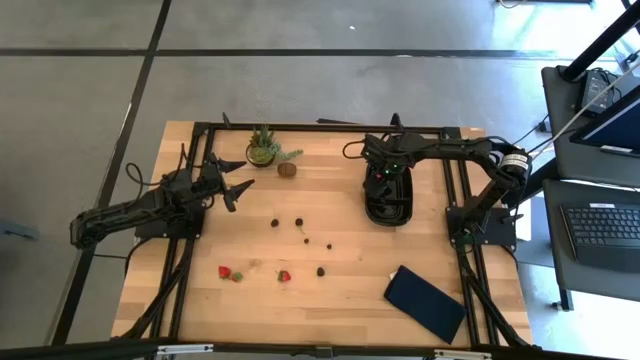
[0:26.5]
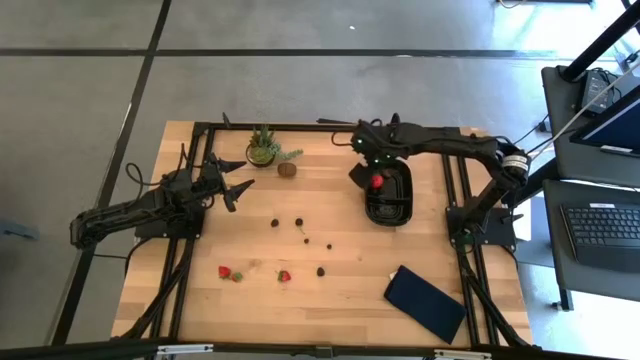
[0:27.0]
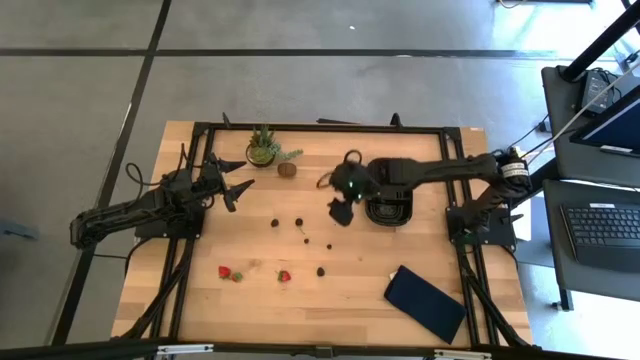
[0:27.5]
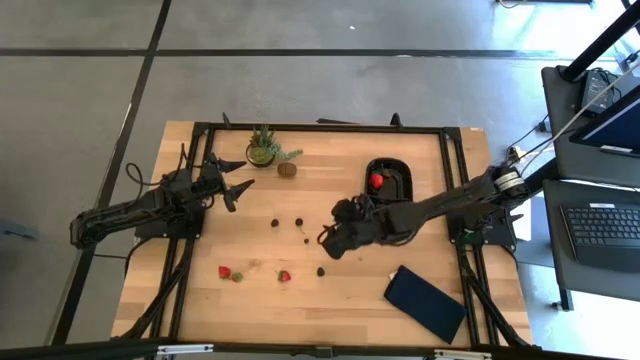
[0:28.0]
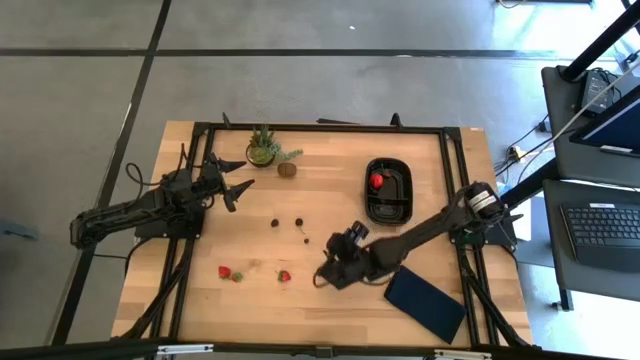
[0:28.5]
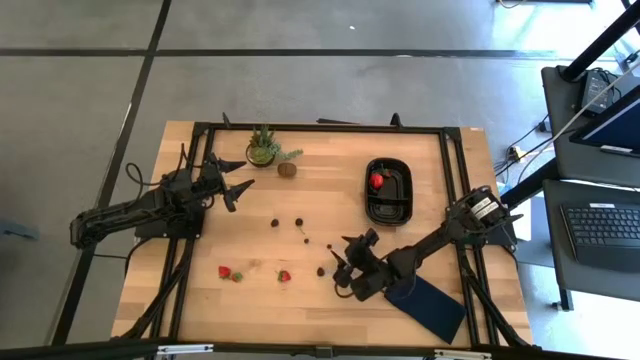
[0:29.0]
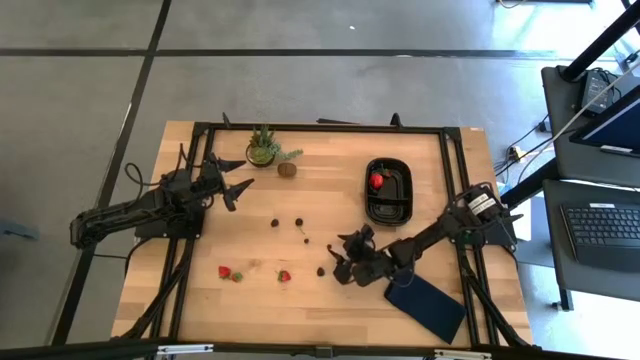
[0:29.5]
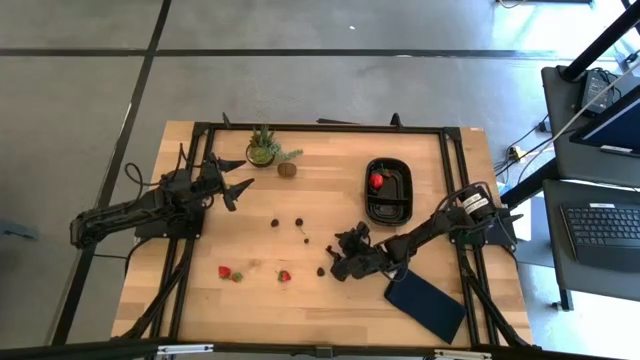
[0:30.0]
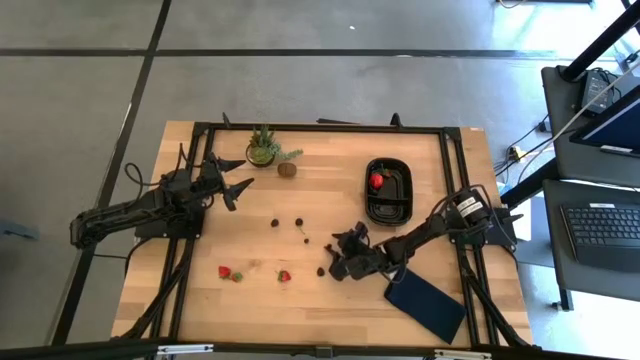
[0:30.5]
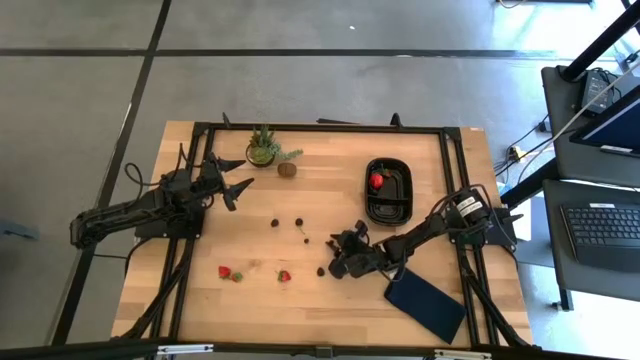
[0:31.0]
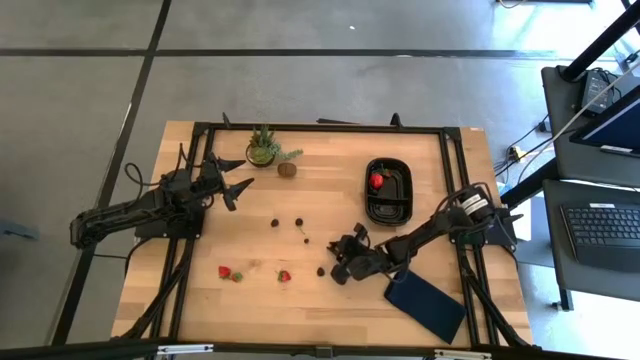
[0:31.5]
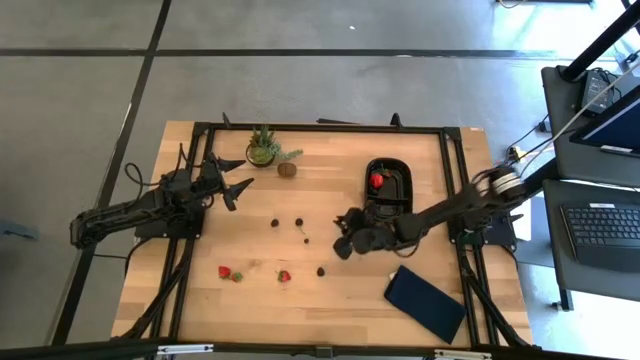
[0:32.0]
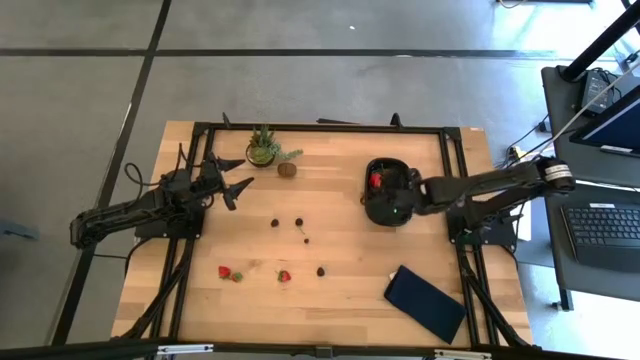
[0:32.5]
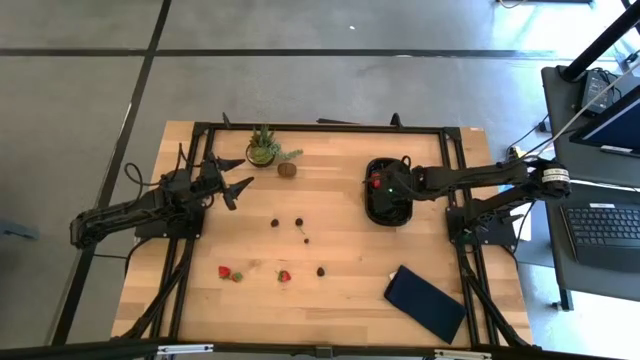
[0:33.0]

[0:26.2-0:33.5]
Task: Pick and placing Produce into tupperware
Put the blueberry into the black bin

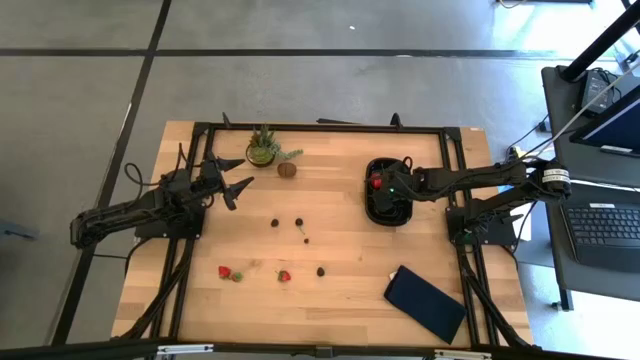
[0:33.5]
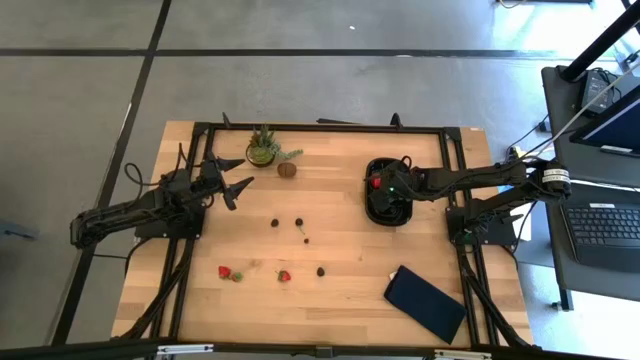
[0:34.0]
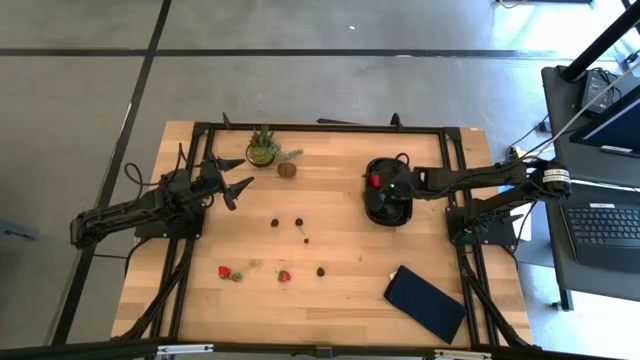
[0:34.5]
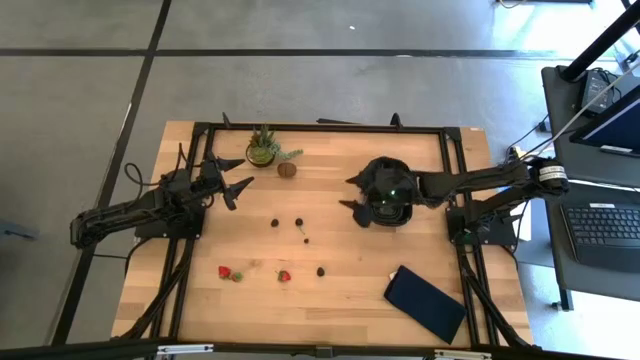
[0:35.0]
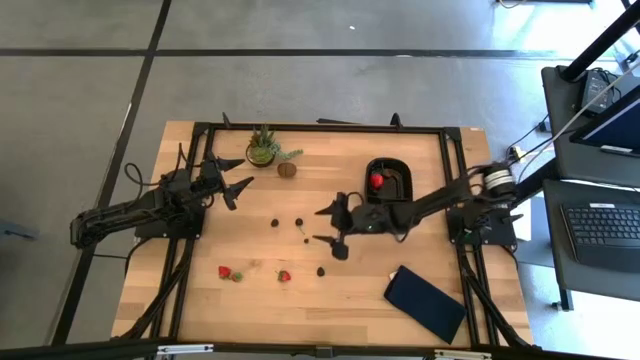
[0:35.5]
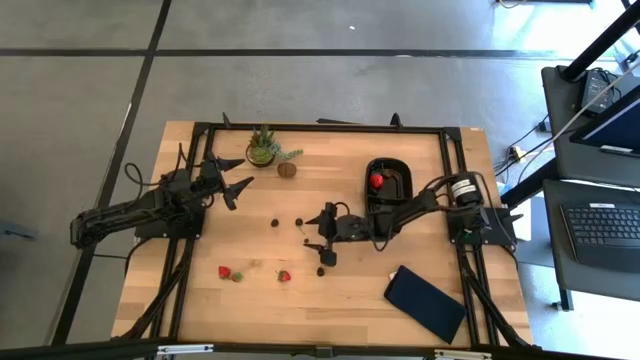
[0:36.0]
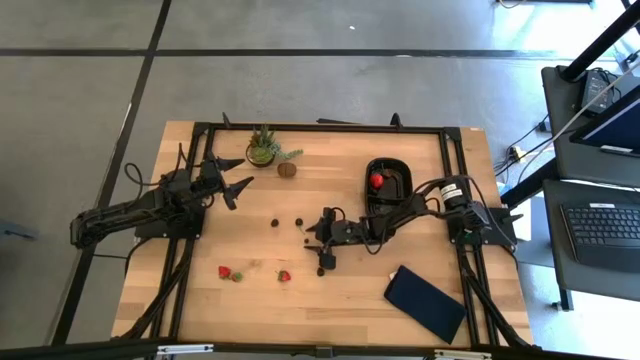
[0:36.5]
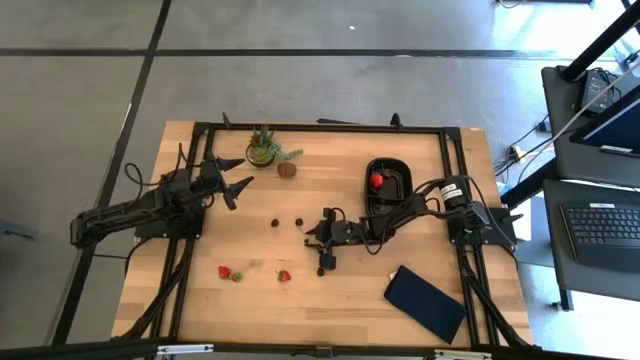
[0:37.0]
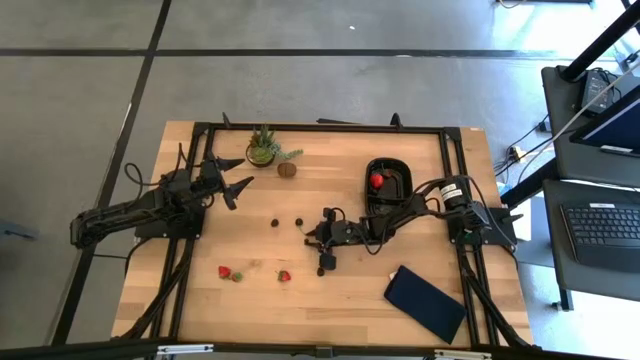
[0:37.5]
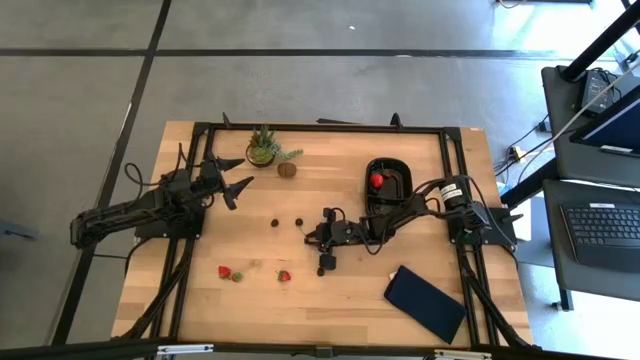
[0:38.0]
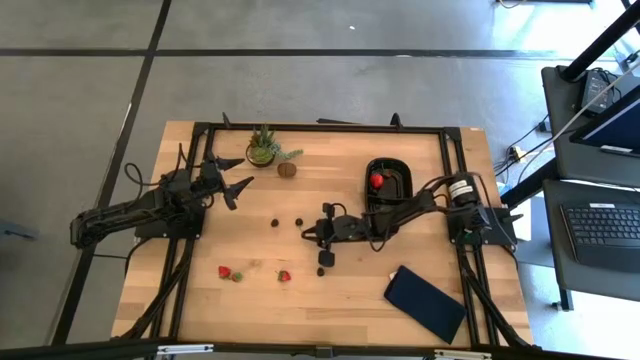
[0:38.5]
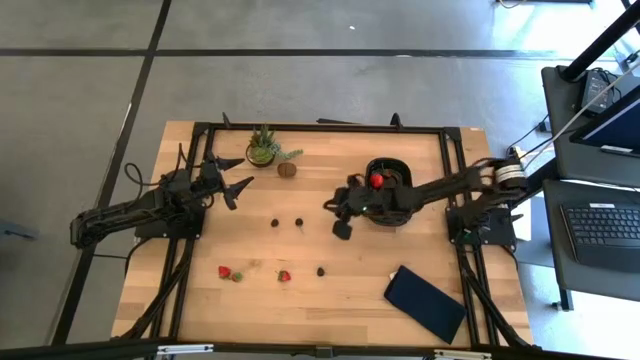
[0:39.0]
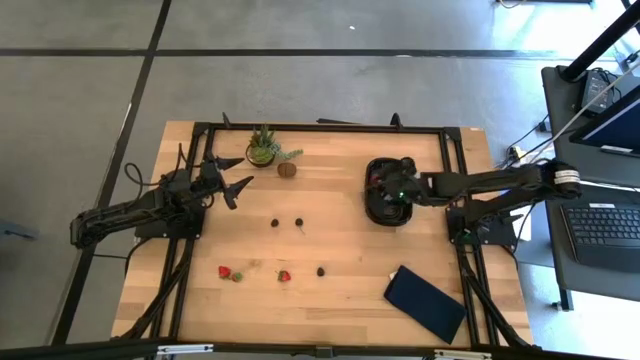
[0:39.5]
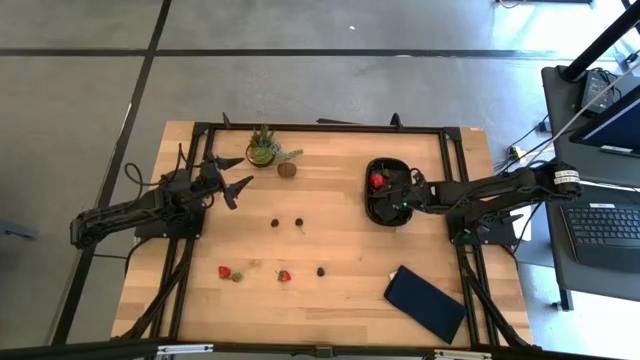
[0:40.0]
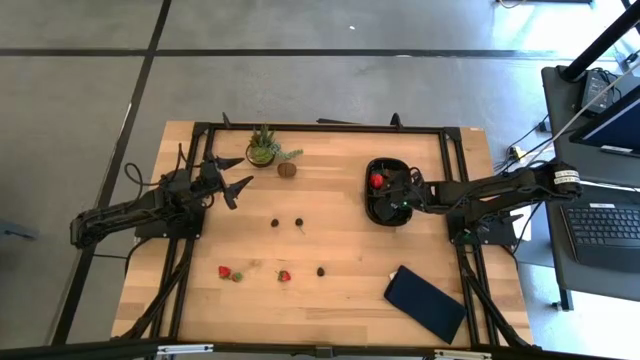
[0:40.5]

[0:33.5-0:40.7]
Put the blueberry into the black bin

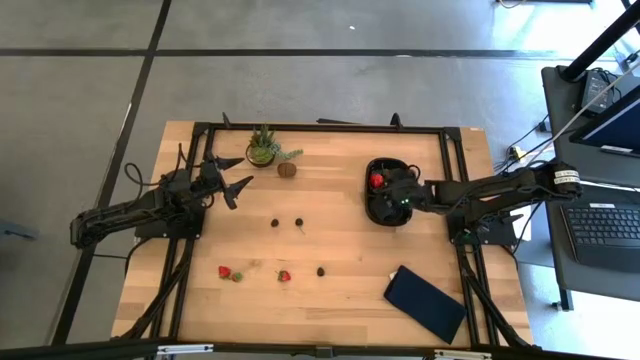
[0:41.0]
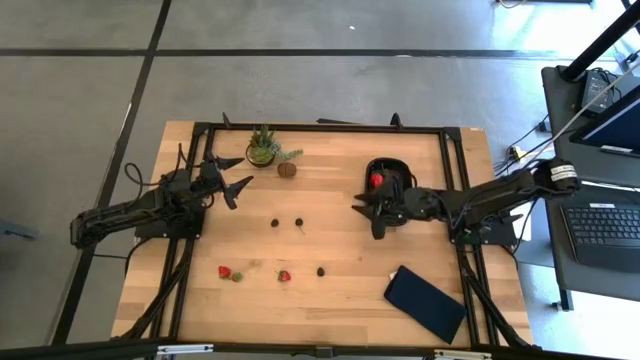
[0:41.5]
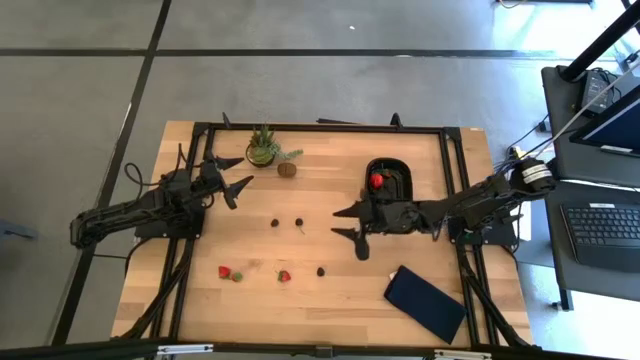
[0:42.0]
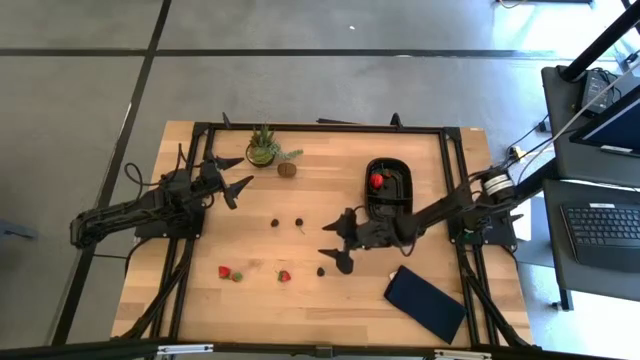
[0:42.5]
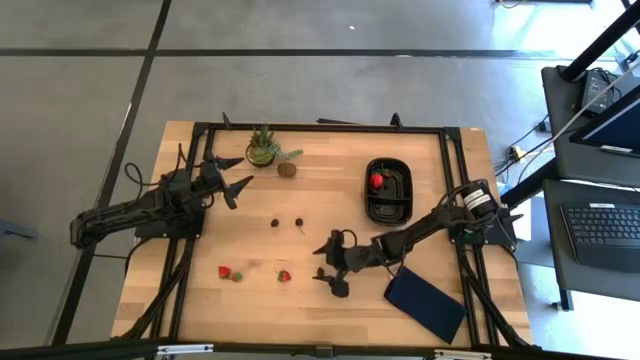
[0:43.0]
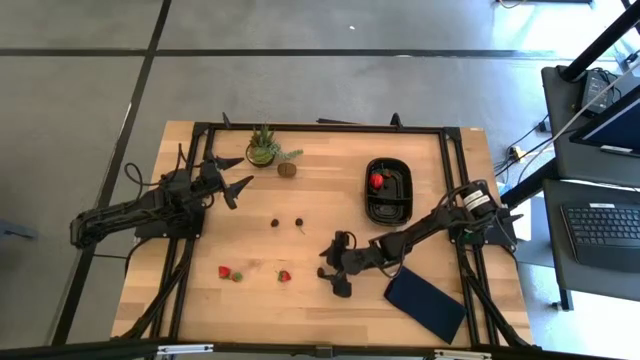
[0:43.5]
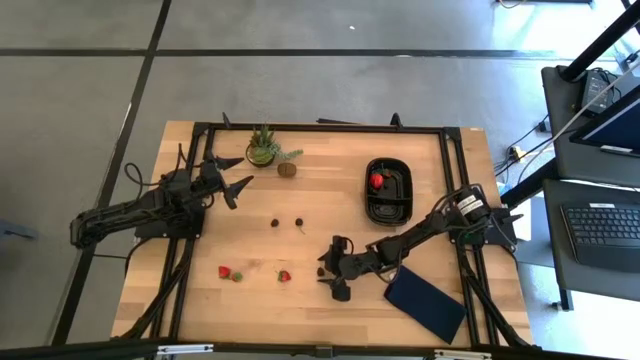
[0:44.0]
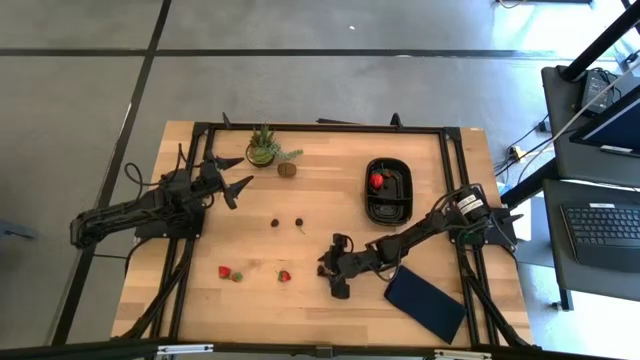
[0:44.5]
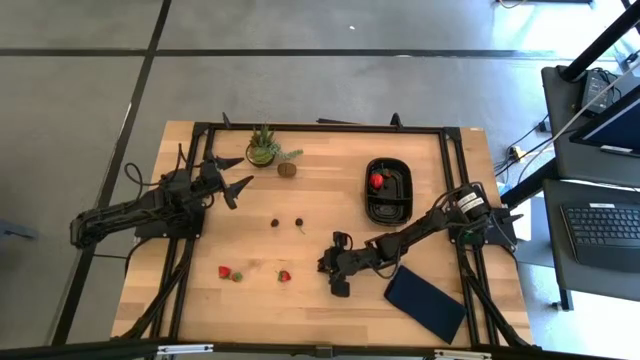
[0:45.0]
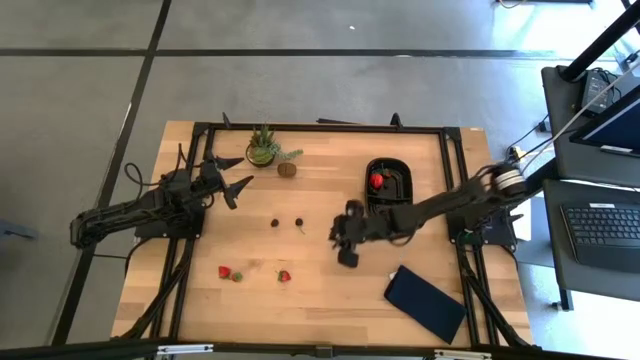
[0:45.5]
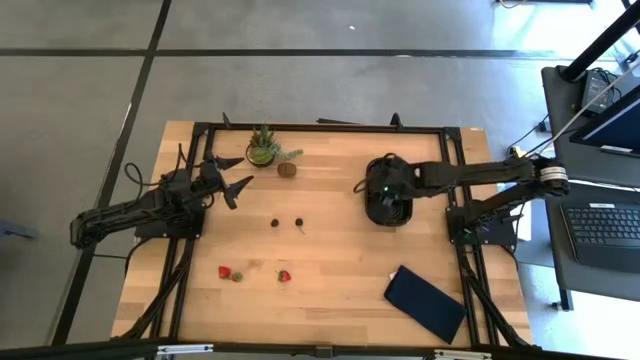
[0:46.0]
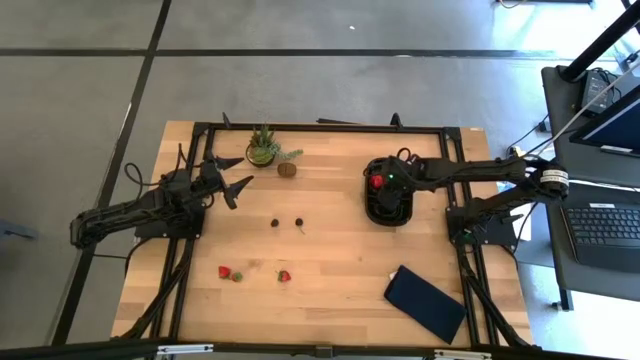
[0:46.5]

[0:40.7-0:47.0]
Put the blackberry into the black bin

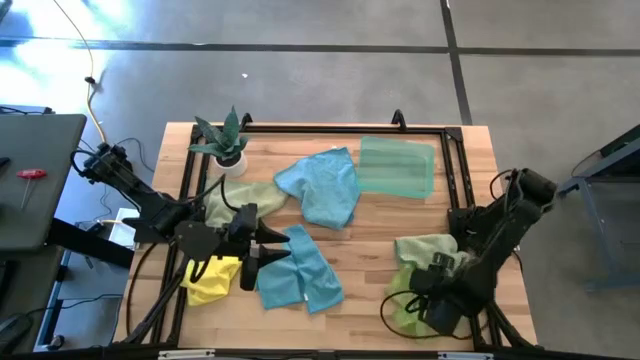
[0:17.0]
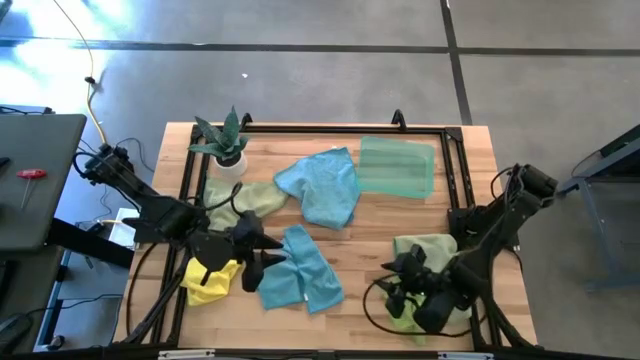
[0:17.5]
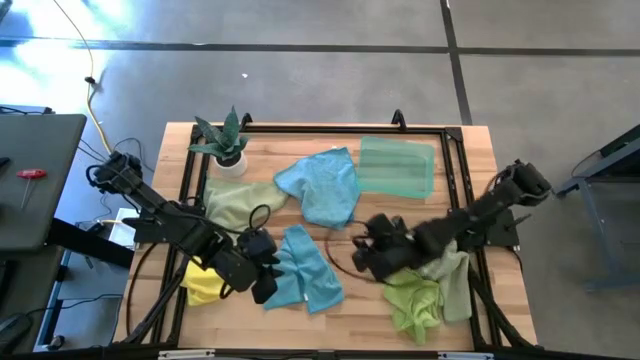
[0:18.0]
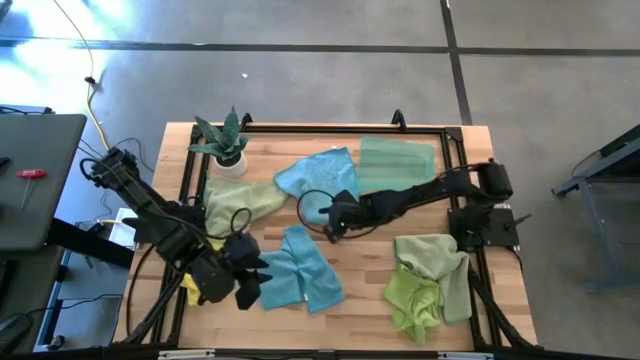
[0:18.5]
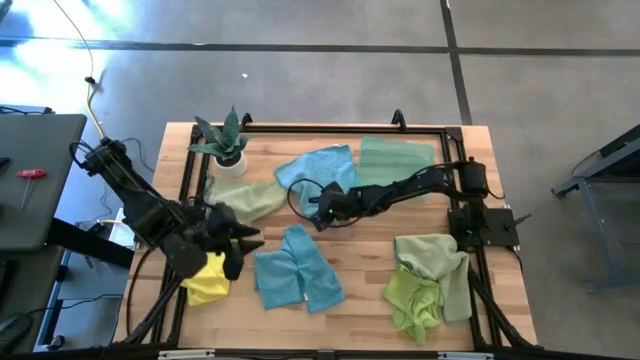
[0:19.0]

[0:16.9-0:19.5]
Task: Fold microfiber towels
Adjust the top blue microfiber cloth
